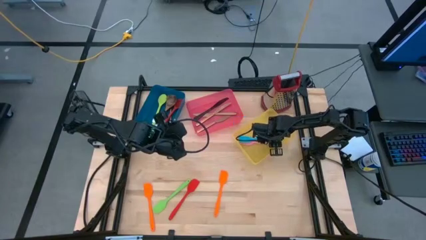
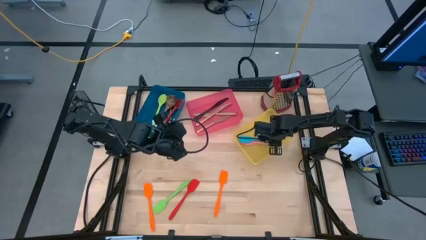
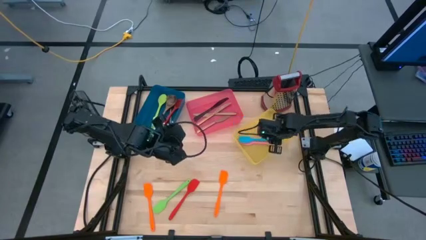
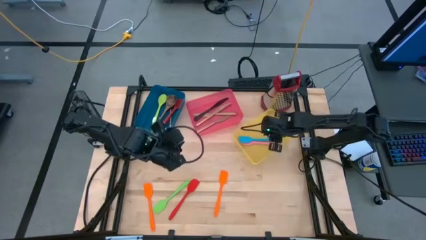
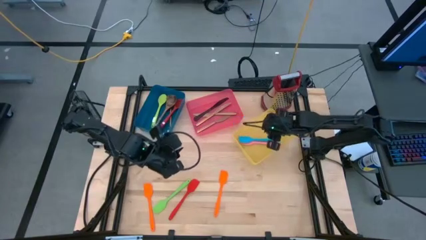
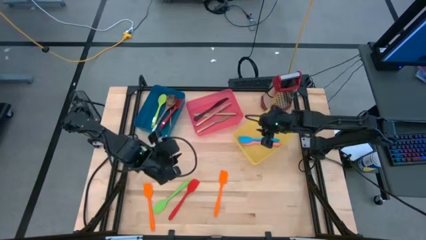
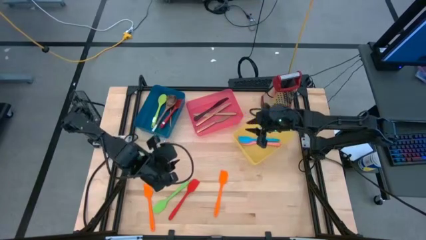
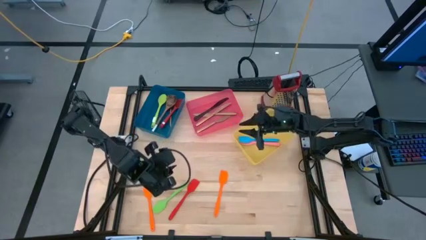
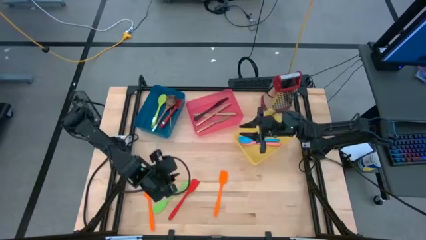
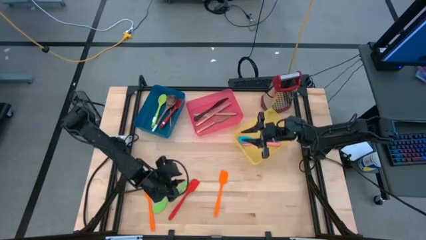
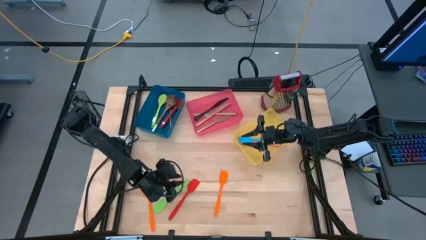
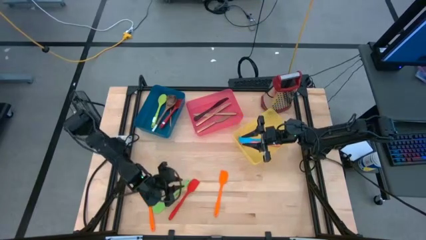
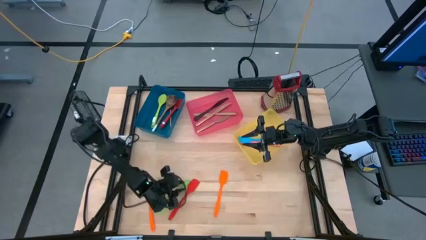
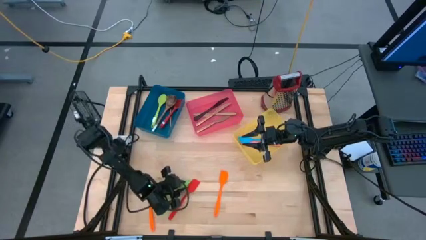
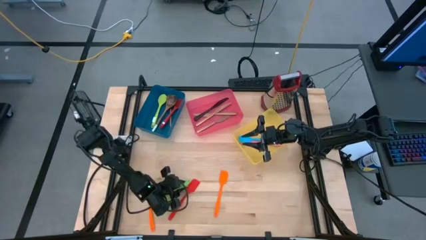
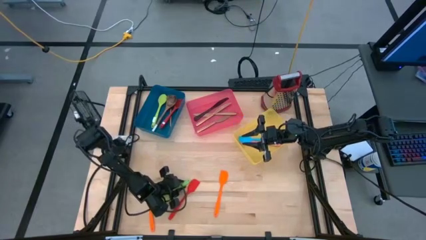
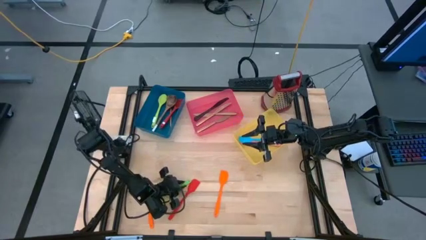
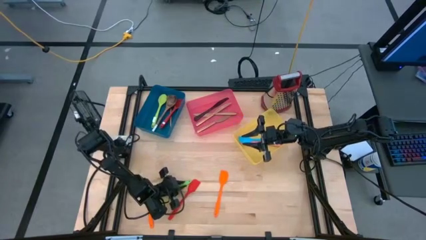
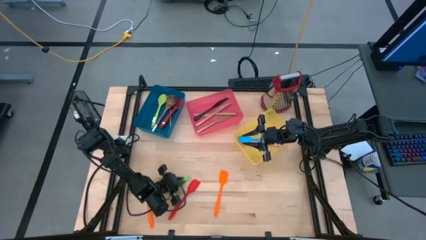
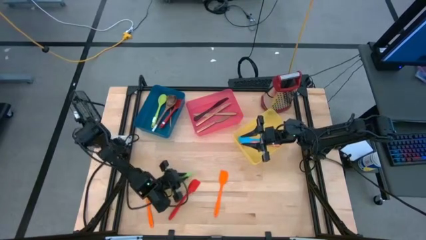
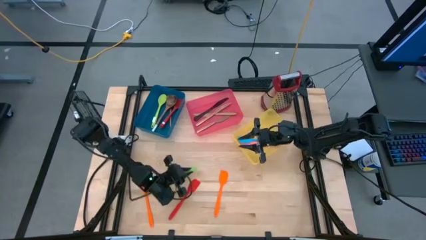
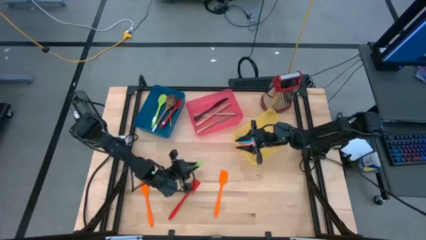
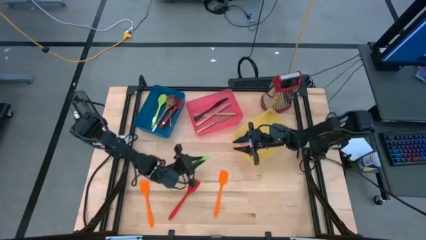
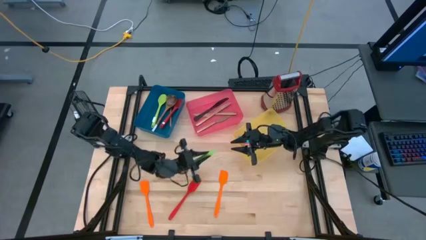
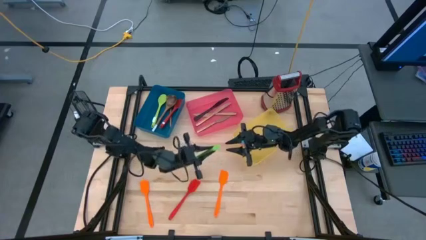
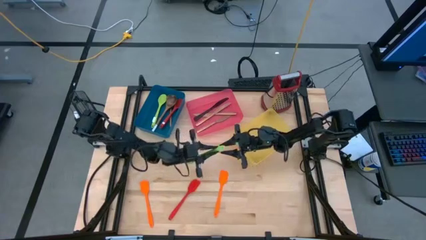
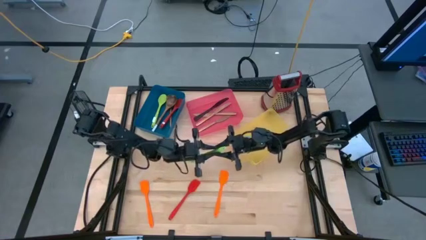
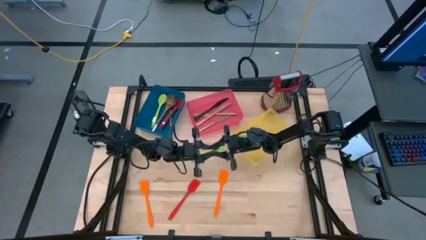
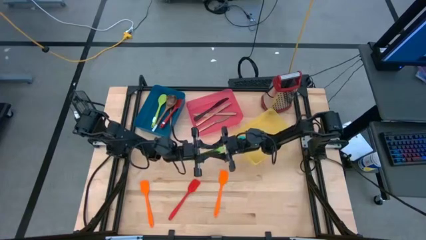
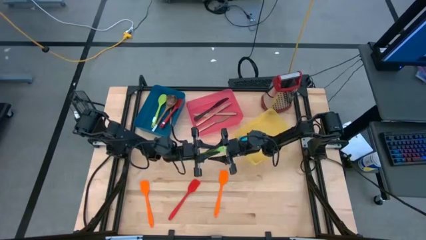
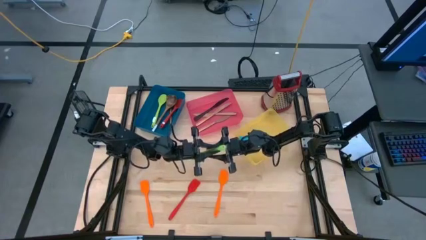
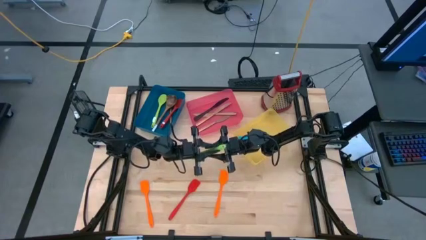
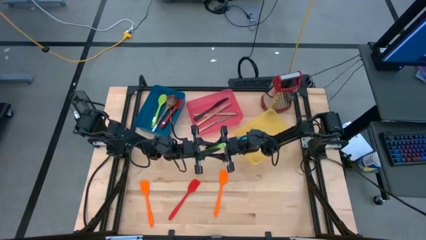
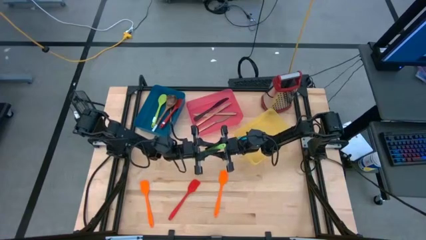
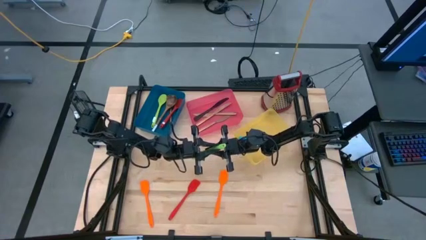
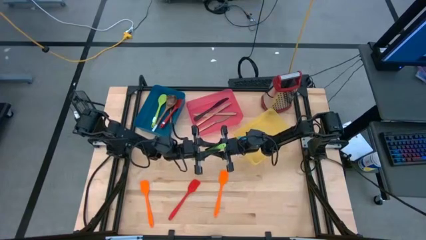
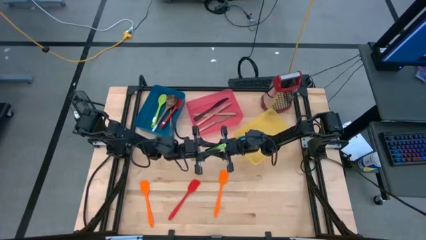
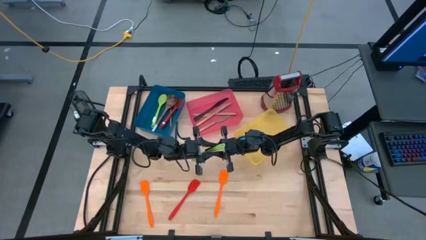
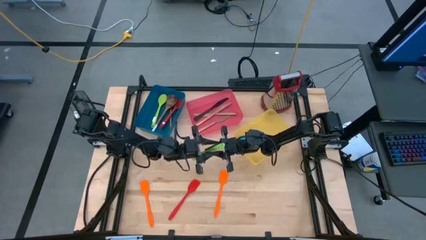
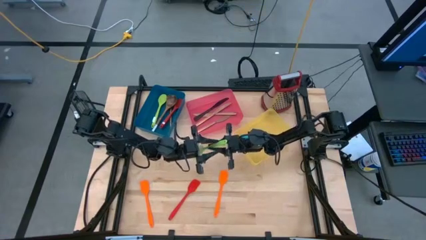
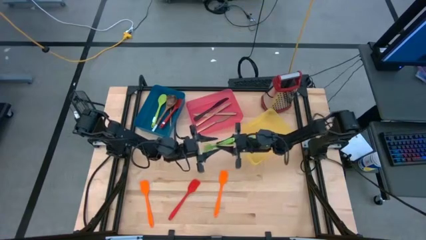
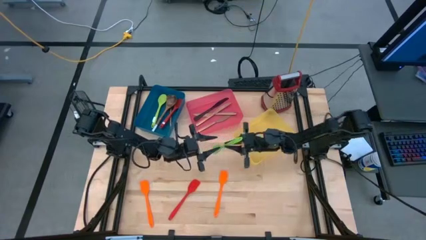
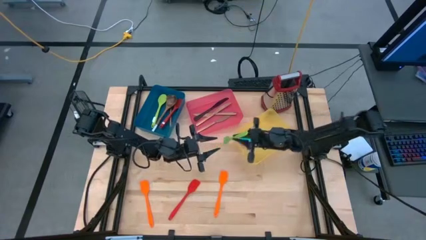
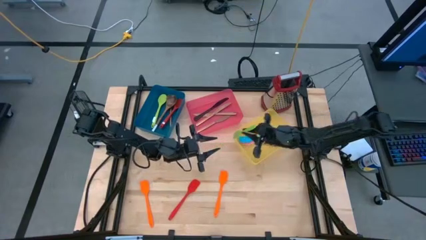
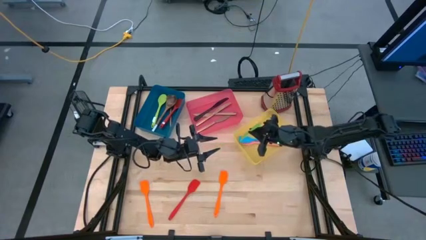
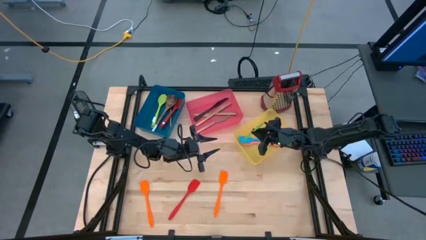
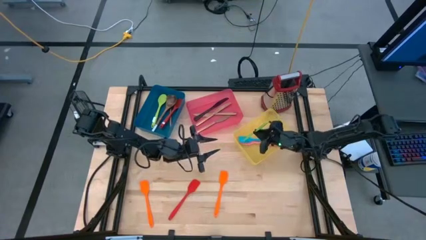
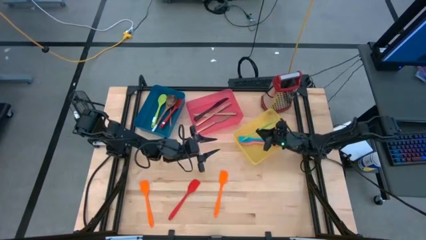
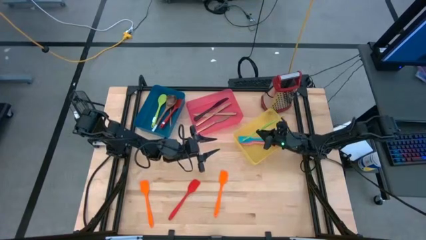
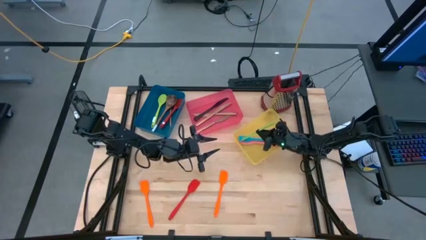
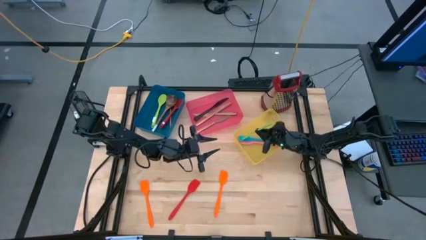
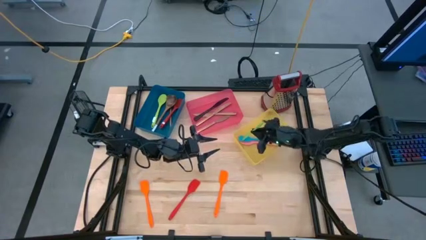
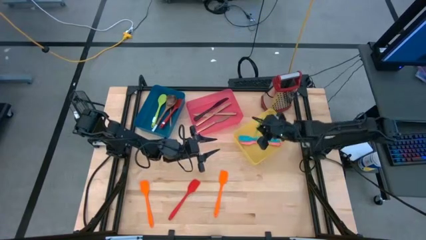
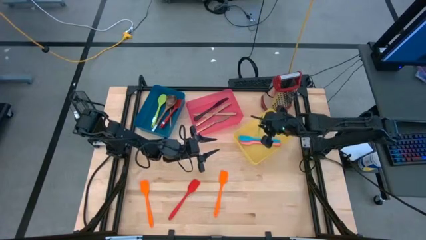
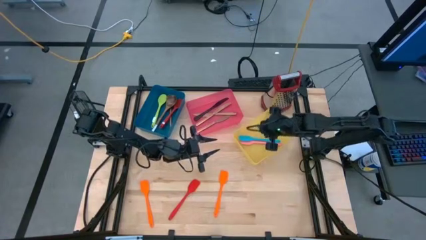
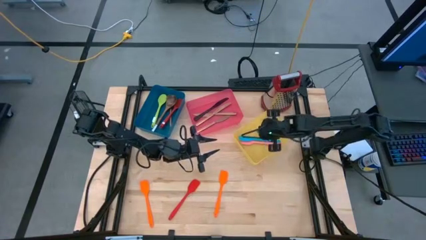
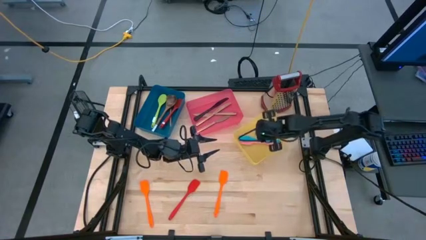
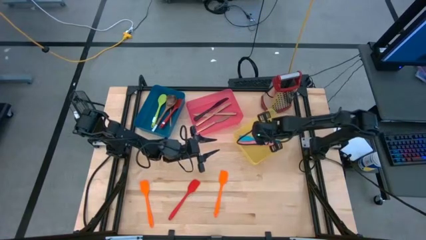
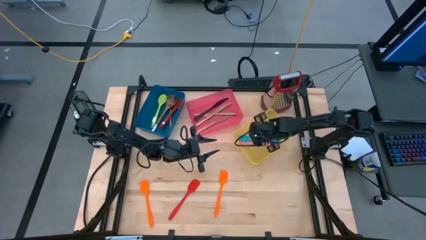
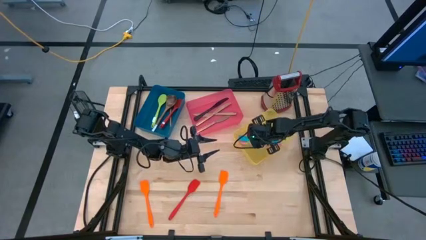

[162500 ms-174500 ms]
Task: Pick & Place Kitchen Items
Put the green spatula into the yellow bin

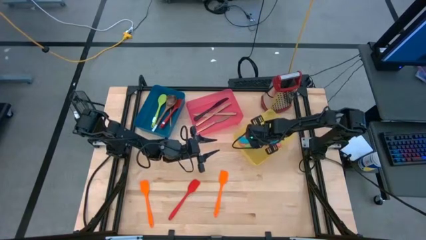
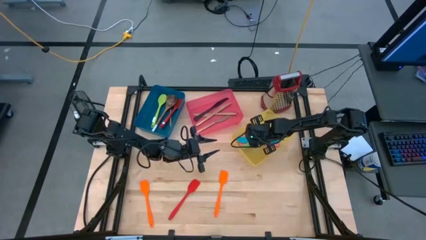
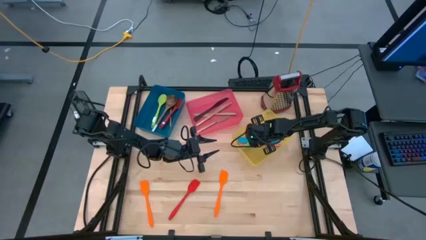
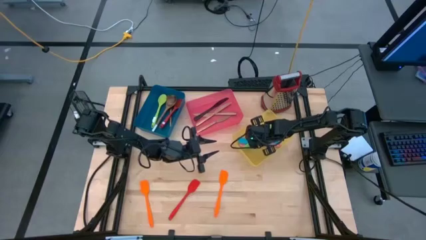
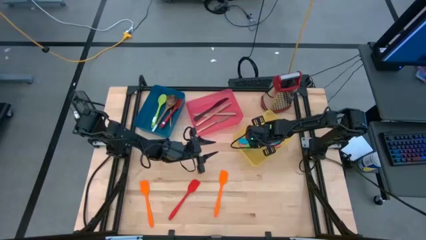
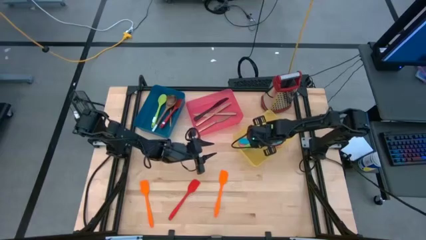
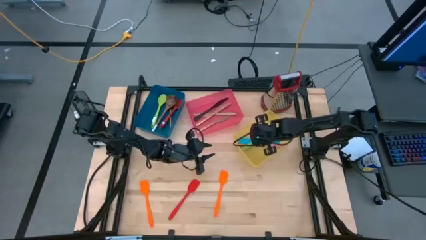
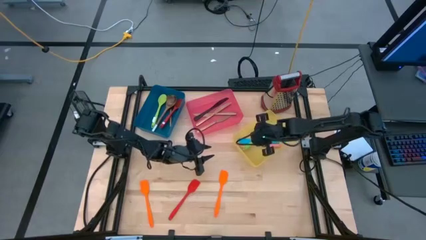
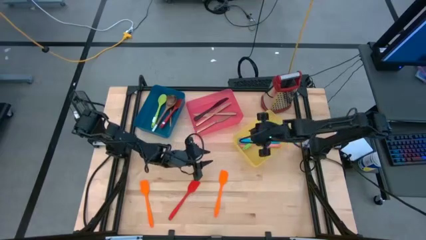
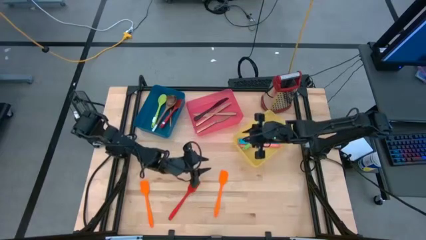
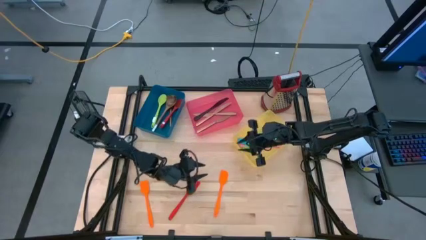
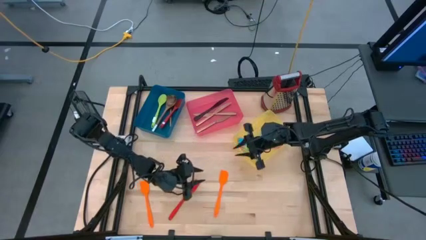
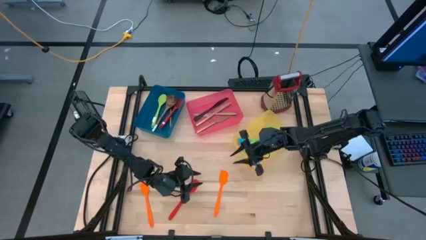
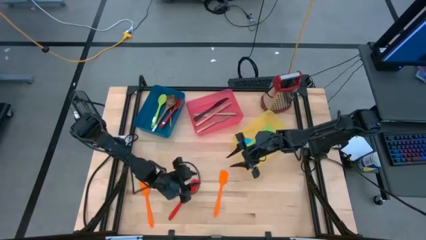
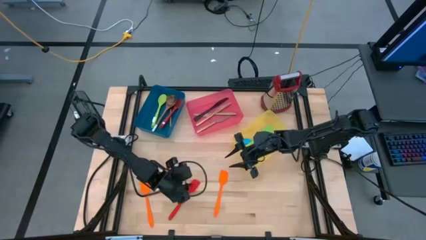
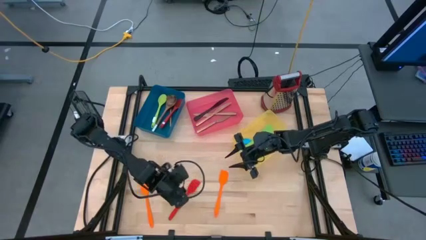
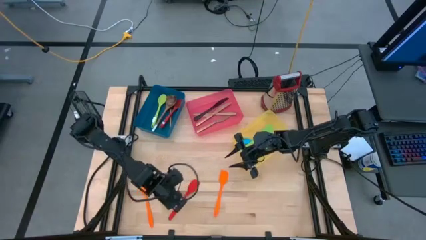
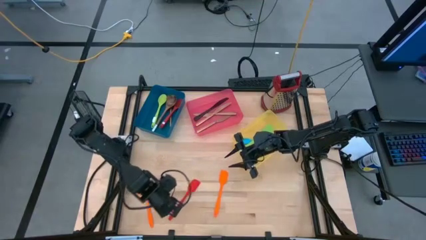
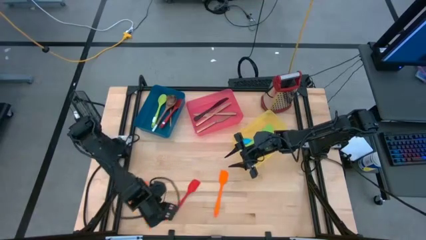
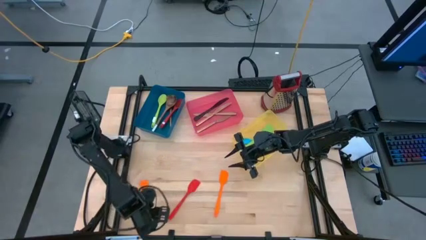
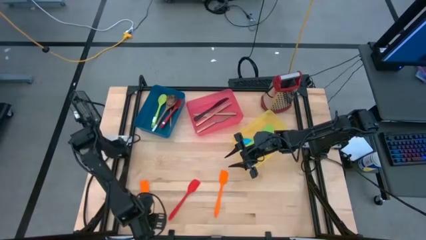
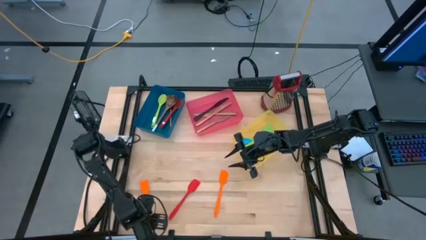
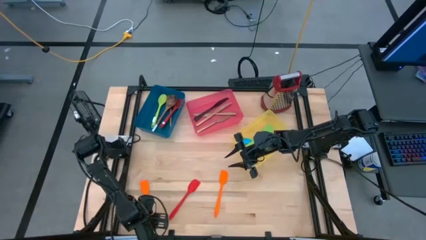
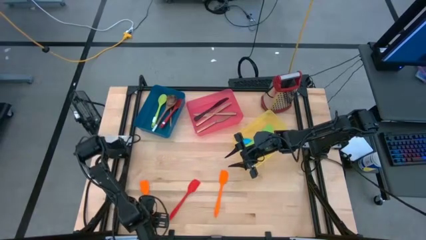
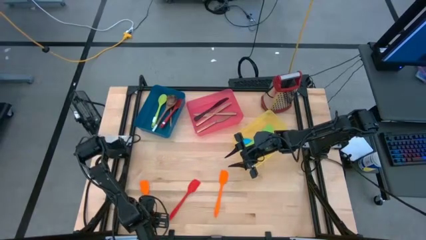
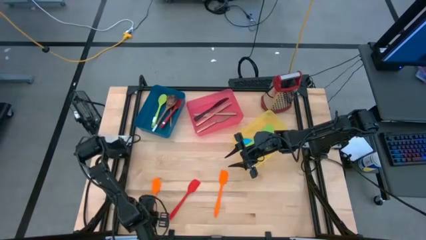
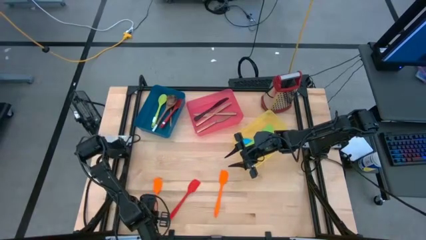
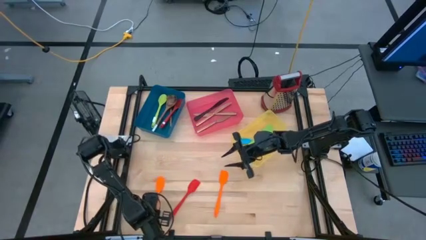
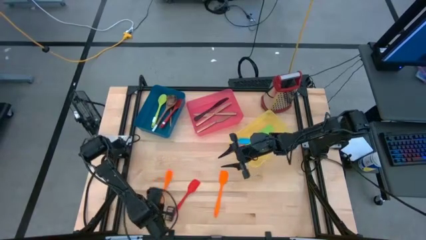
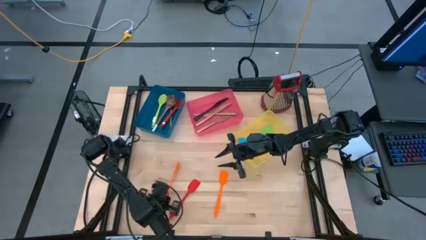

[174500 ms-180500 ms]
Put the left orange spatula into the yellow bin
